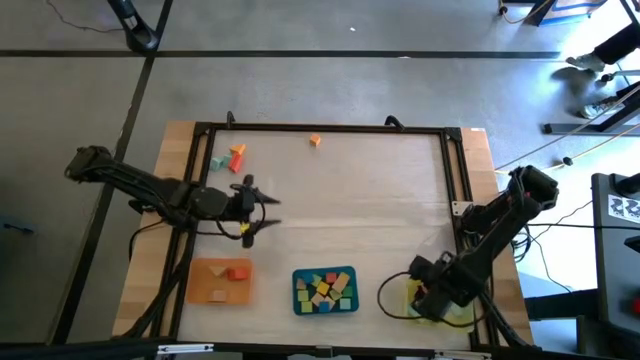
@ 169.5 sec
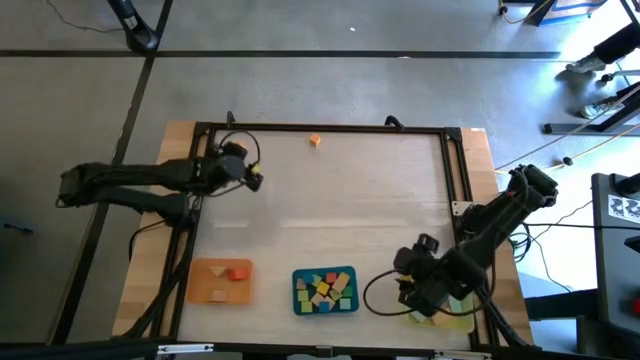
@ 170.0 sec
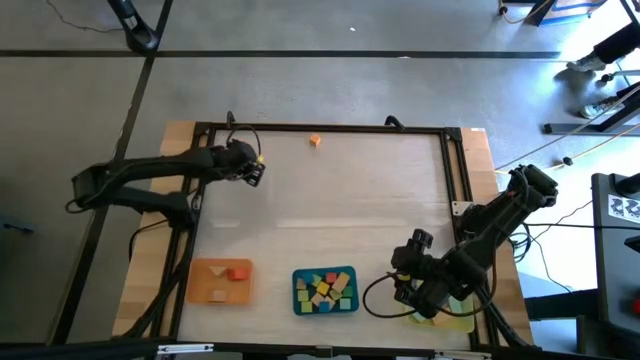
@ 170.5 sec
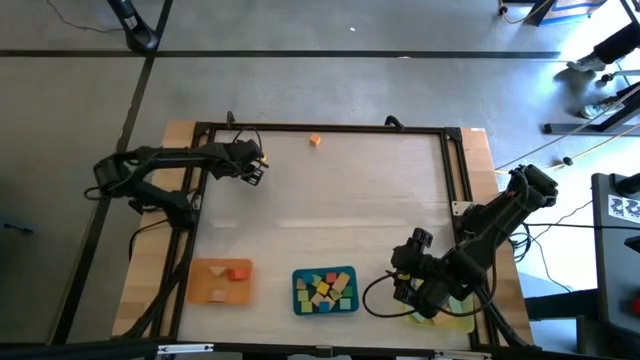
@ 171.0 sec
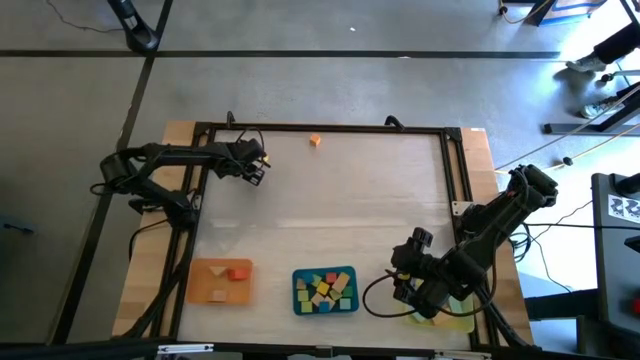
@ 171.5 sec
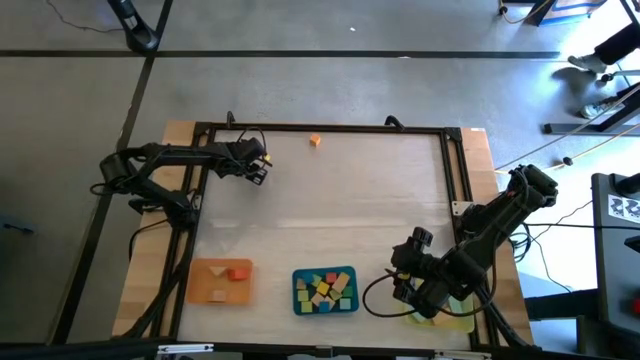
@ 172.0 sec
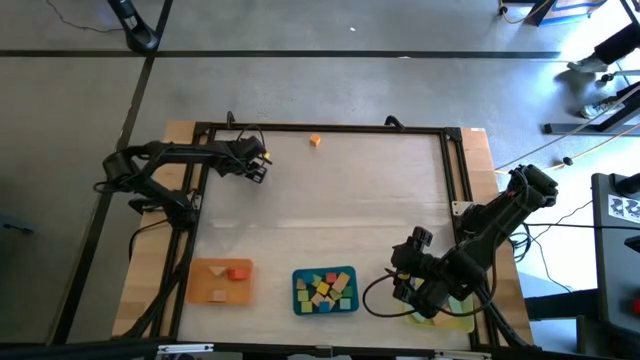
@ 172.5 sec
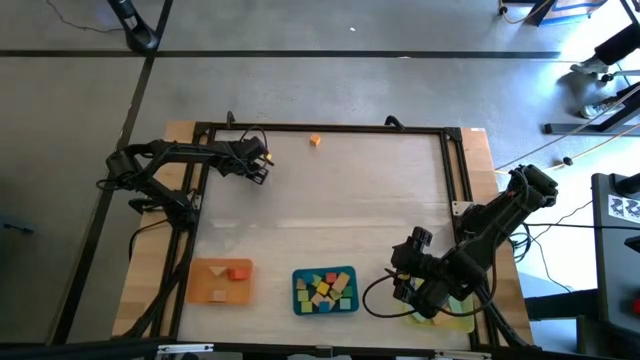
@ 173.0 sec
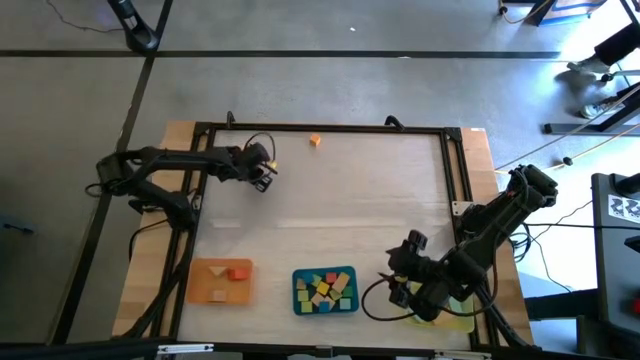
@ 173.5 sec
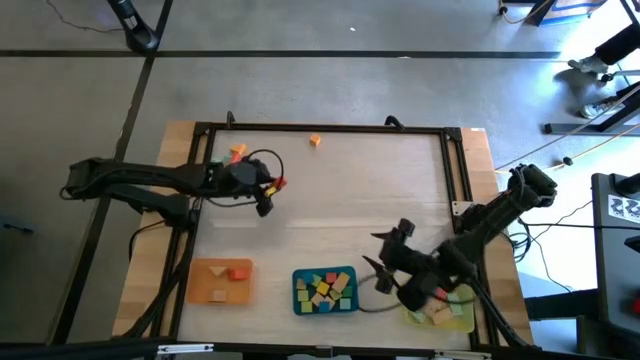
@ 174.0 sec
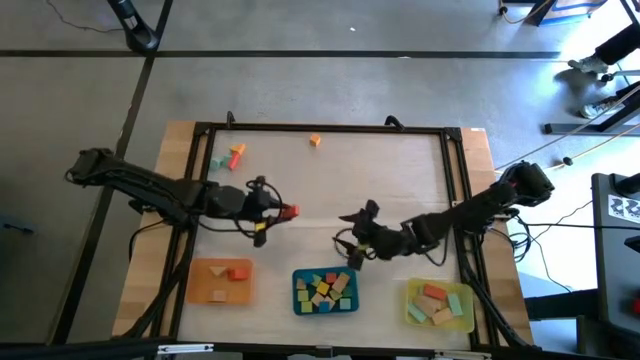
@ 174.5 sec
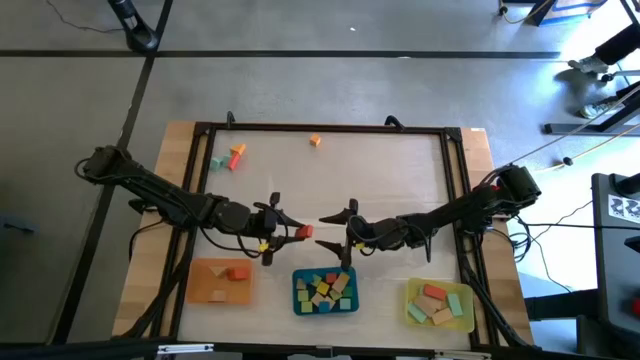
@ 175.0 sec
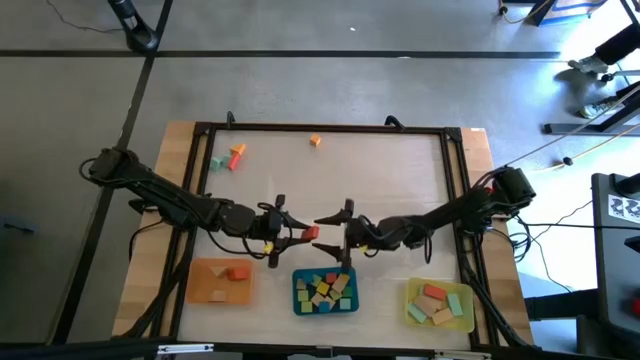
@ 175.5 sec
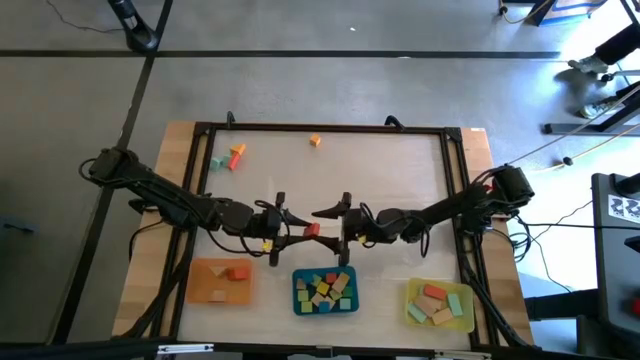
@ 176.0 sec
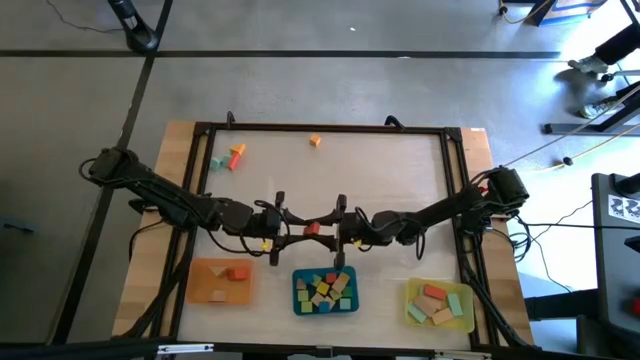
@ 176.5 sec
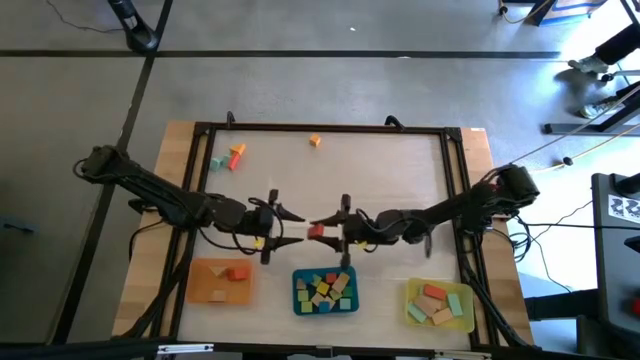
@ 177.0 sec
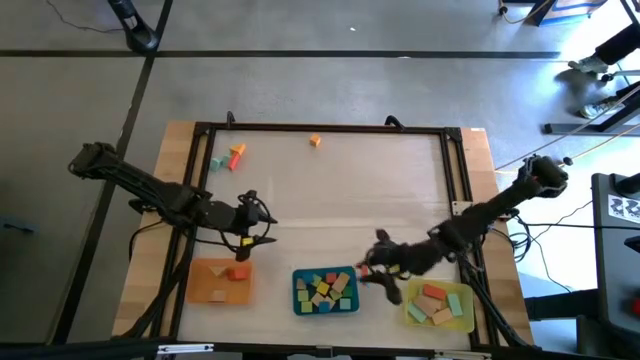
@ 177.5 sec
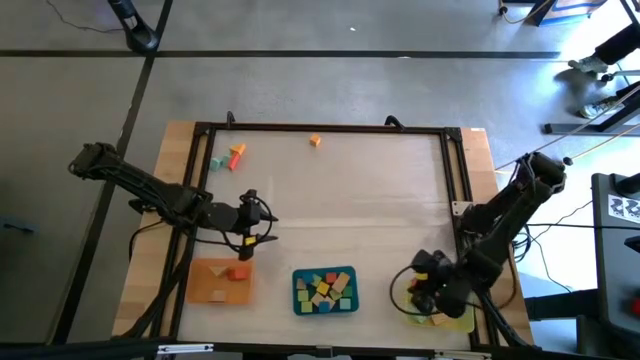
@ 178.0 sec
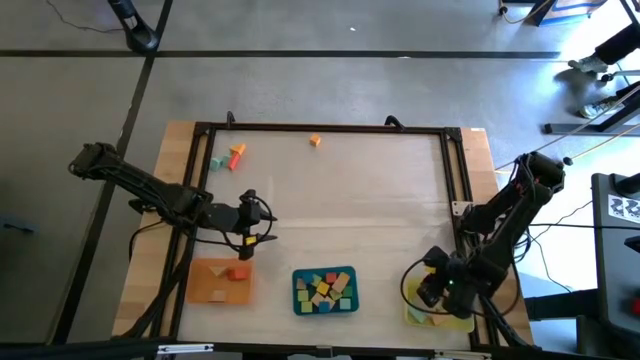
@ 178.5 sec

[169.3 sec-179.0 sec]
Task: Sort blocks by size
Put the orange rectangular block into the yellow bin

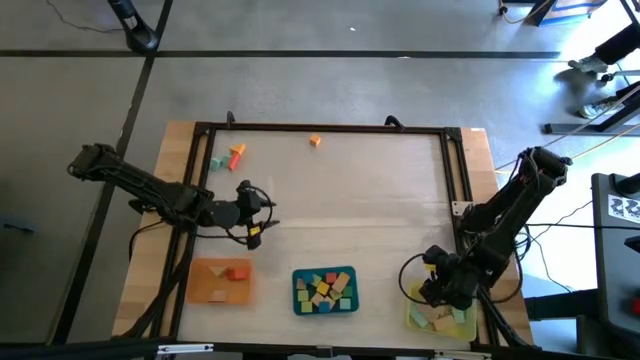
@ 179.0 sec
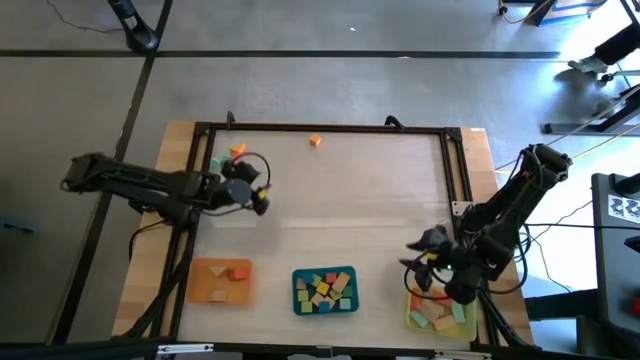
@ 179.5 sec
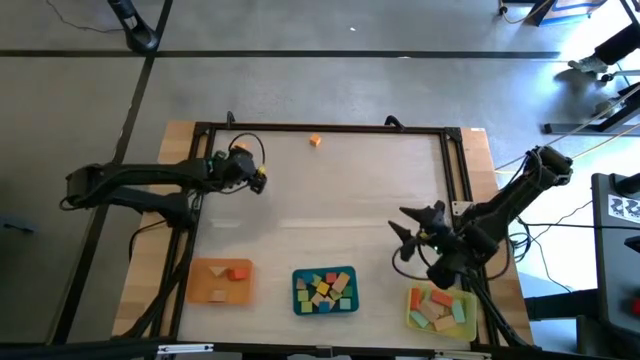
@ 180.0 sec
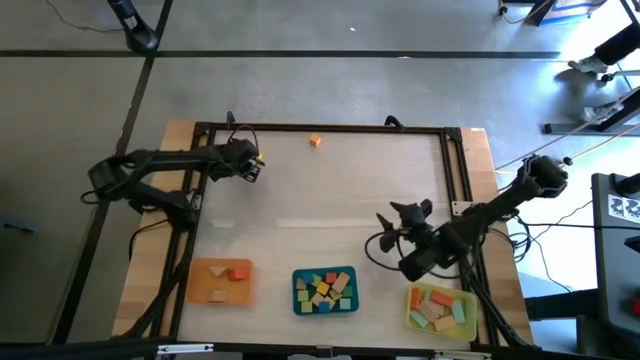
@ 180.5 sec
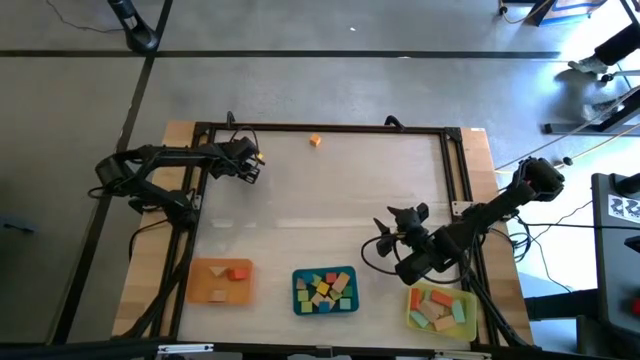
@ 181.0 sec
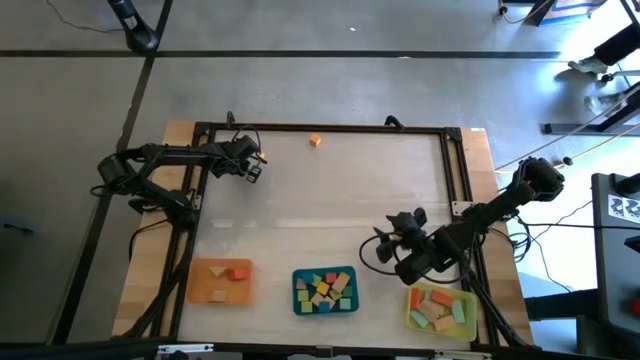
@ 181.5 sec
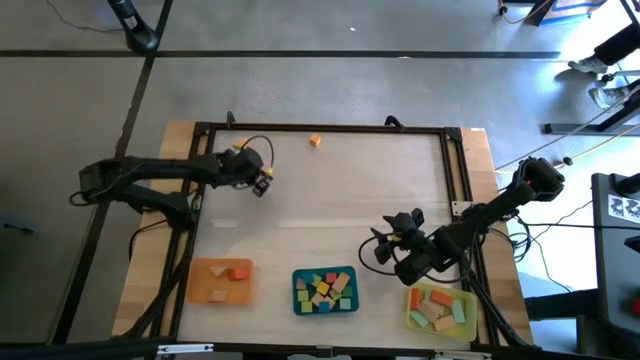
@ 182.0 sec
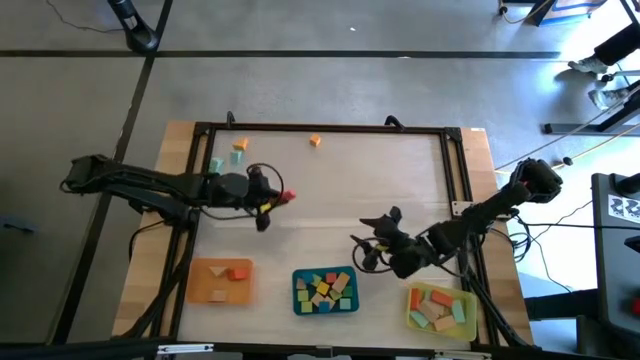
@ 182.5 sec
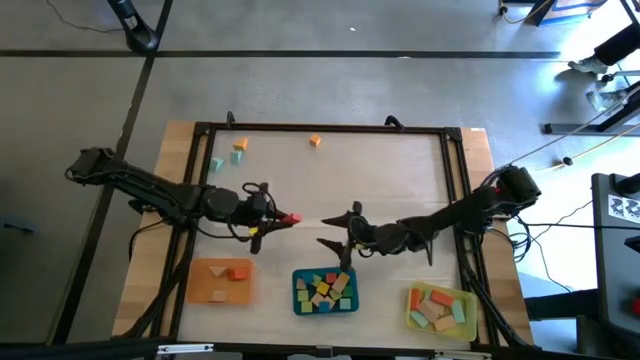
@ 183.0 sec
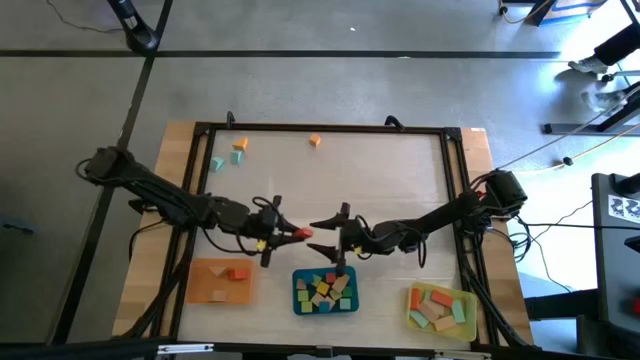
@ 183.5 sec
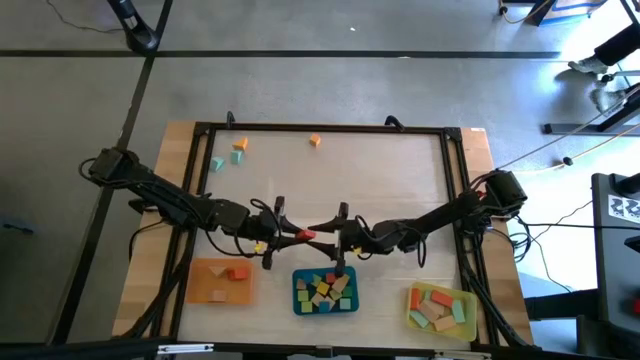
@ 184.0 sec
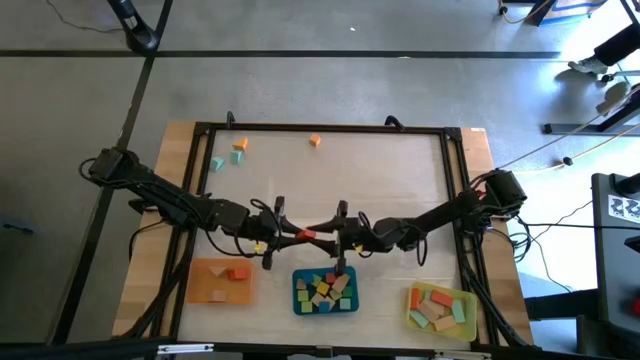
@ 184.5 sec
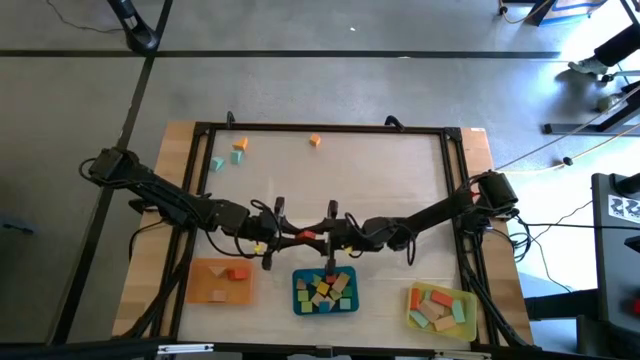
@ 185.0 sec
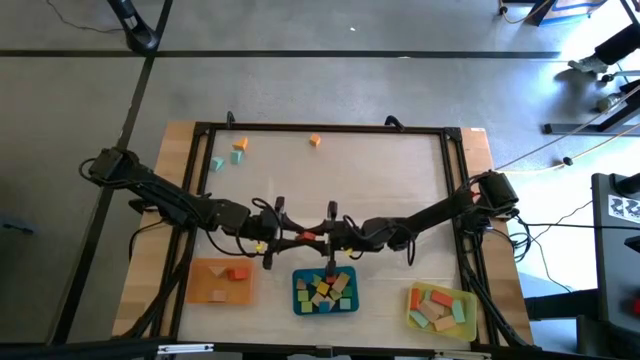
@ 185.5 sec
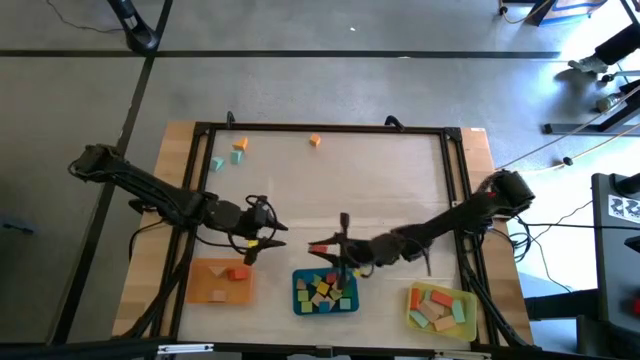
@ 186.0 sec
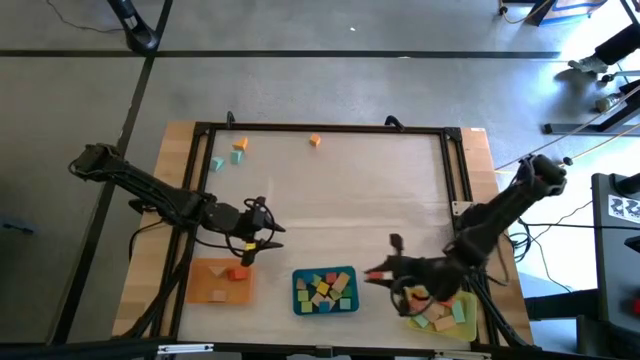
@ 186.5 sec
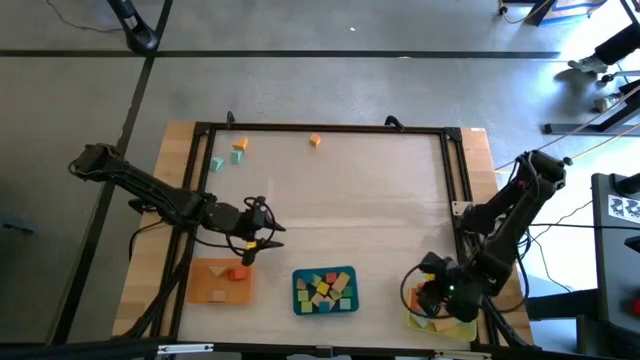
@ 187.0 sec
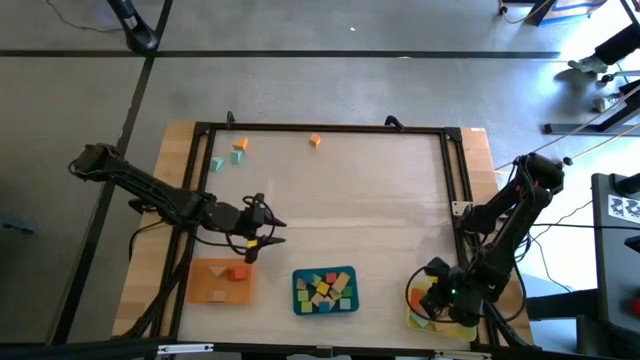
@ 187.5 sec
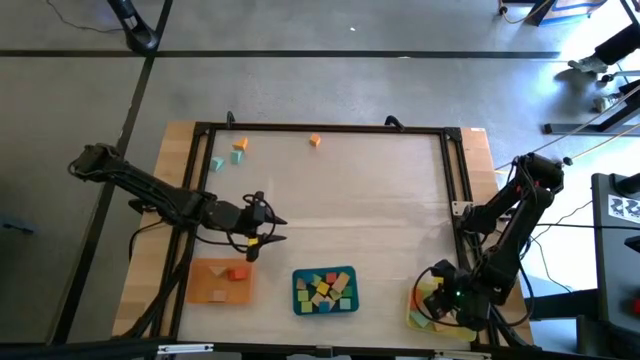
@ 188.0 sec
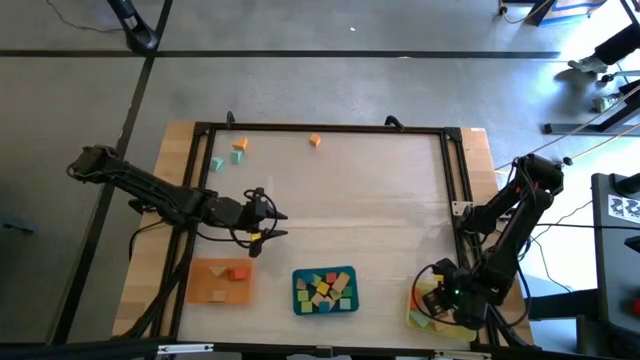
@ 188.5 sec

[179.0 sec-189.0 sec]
Put the orange rectangular block into the yellow bin
